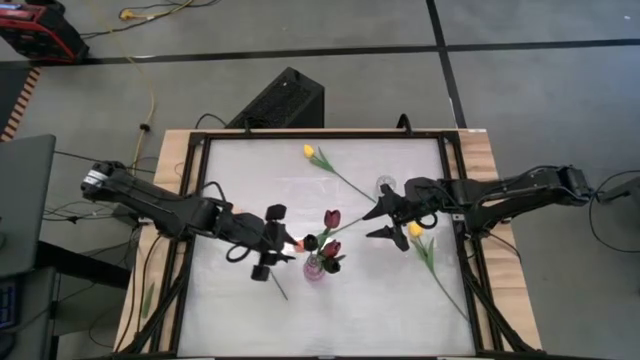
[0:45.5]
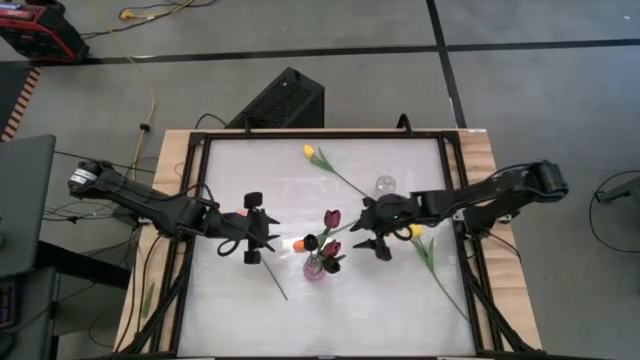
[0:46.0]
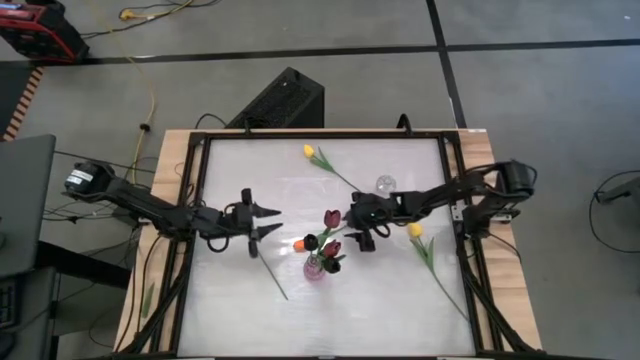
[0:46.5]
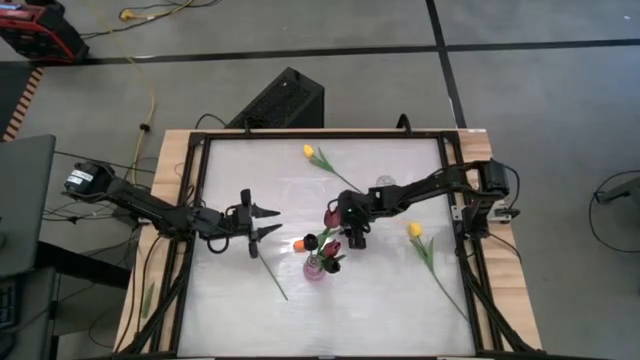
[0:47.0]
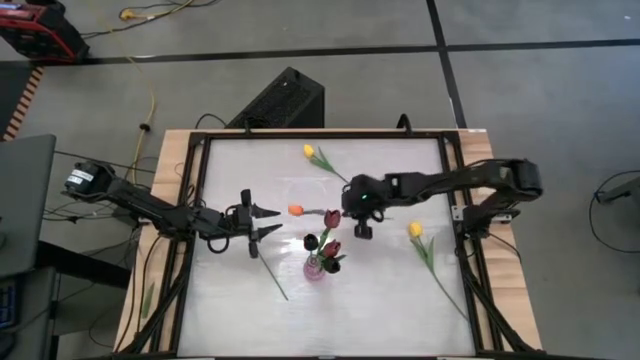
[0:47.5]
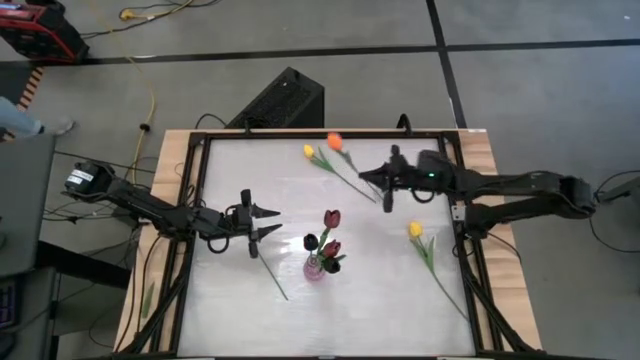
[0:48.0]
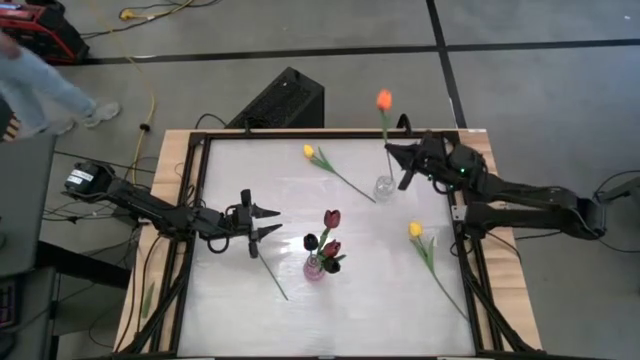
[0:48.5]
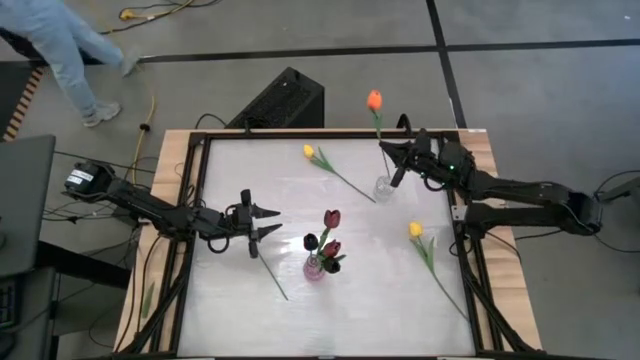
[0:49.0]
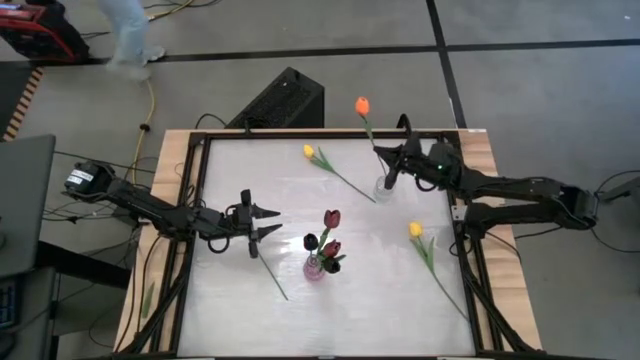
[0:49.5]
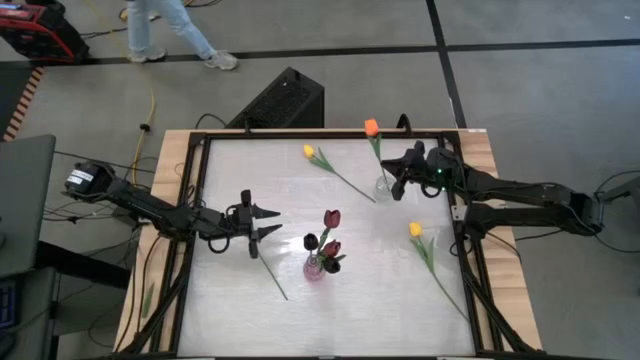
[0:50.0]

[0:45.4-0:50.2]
Task: Sort flowers into vase by color
Put the right orange flower into the transparent vase

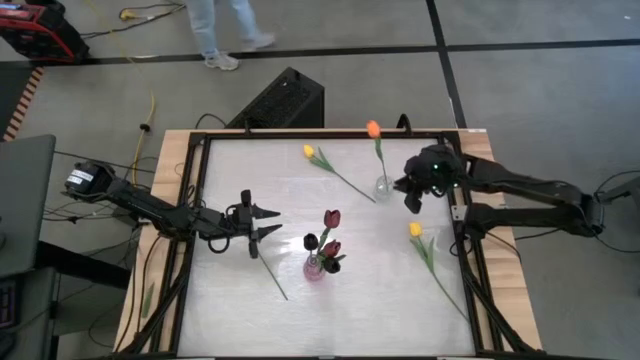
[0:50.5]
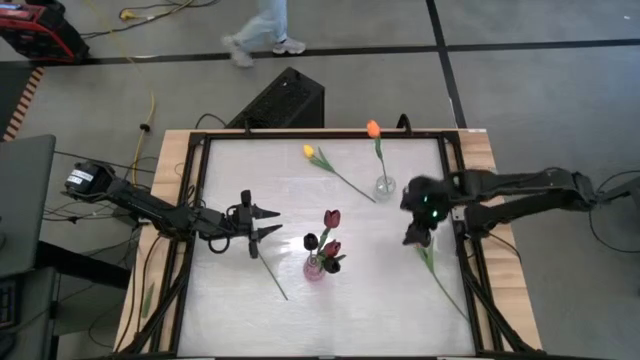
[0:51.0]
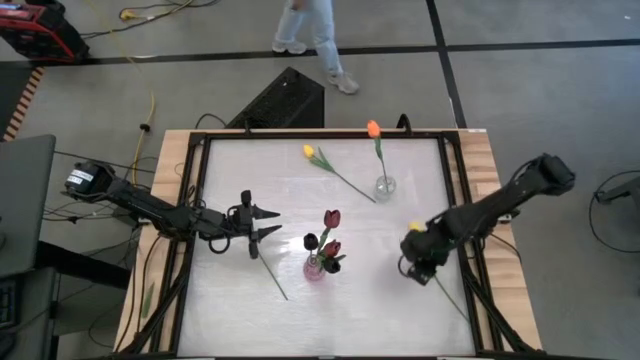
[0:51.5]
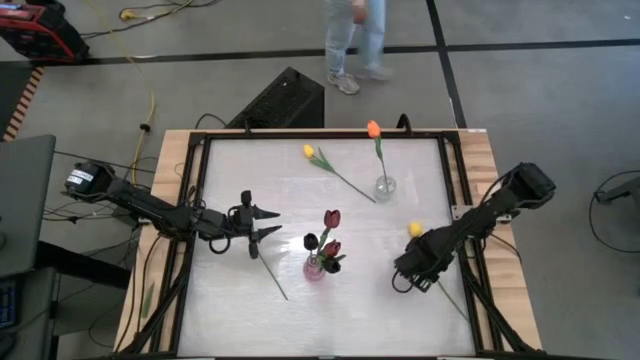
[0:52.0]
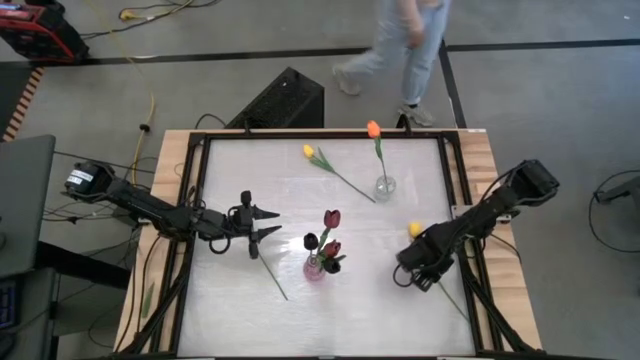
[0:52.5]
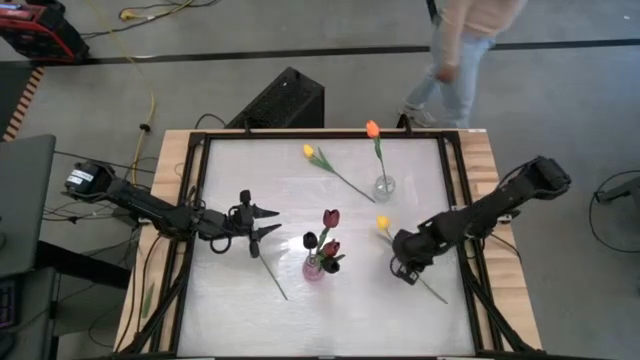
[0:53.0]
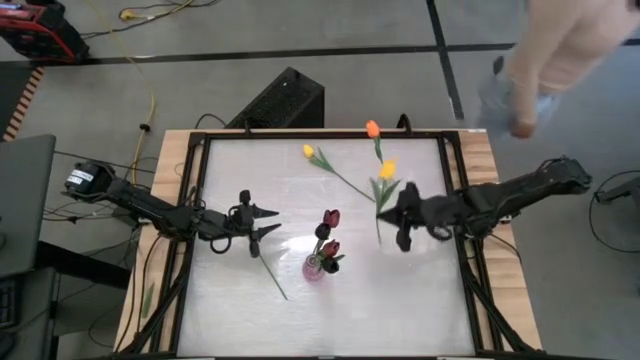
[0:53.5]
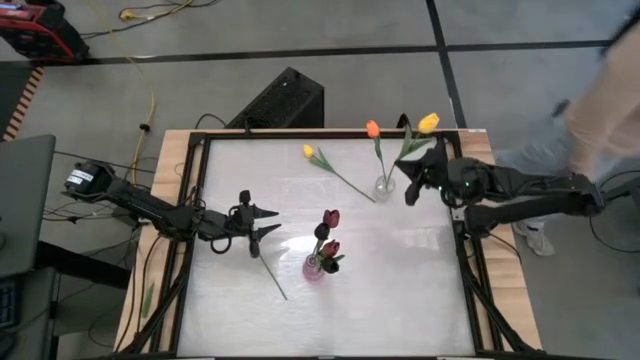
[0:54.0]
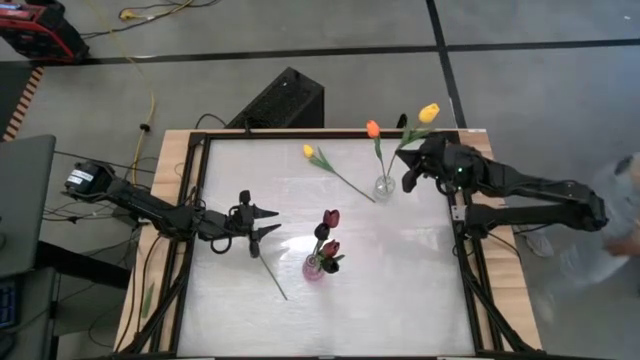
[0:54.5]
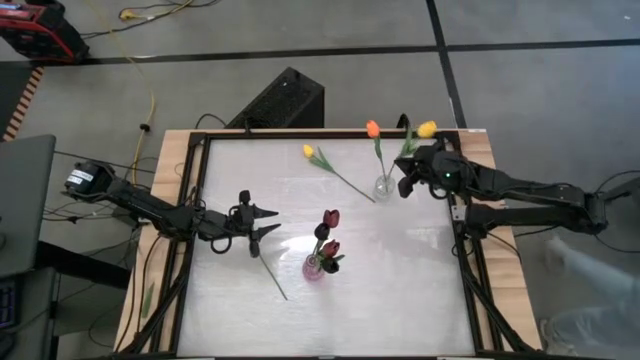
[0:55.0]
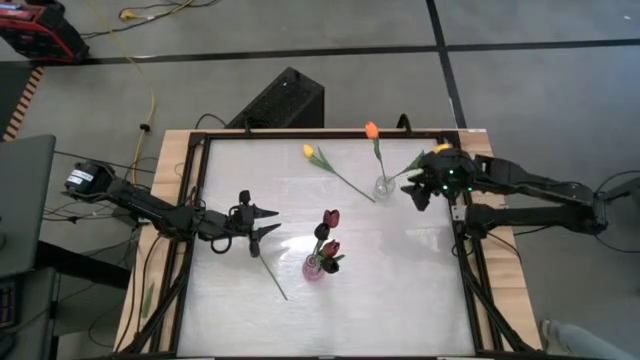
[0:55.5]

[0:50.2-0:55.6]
Put the bottom right yellow flower into the transparent vase

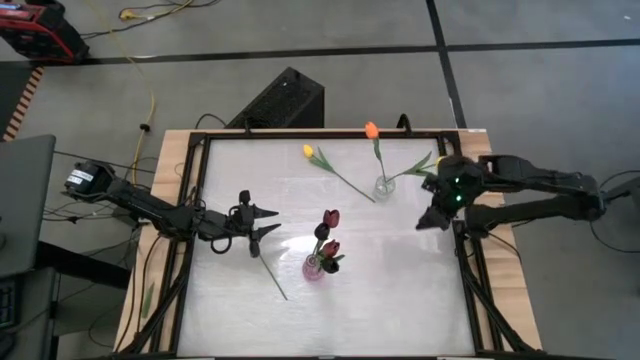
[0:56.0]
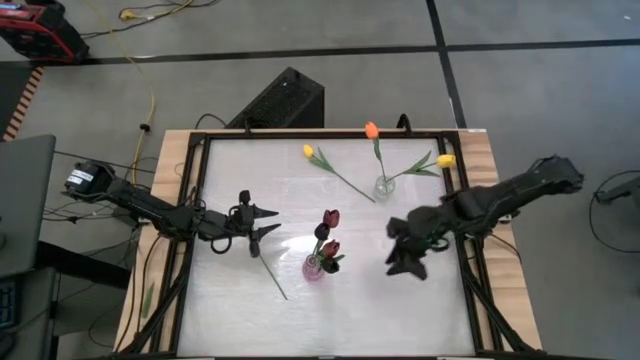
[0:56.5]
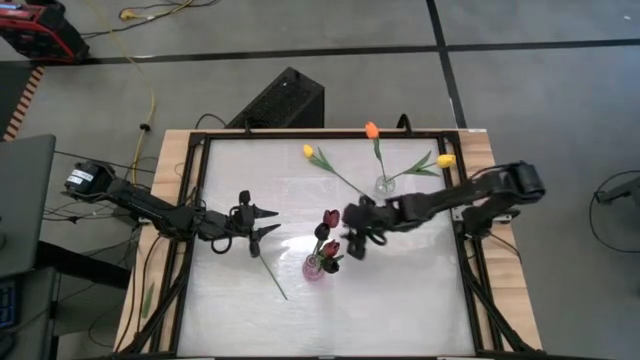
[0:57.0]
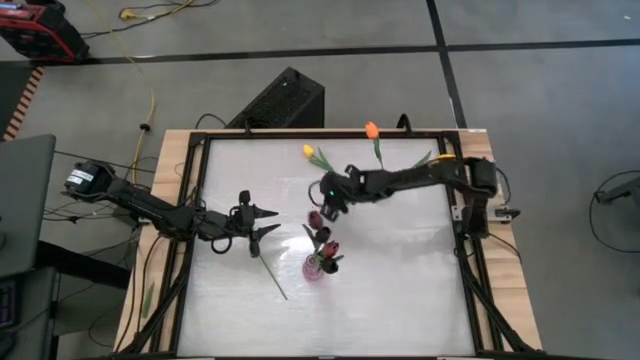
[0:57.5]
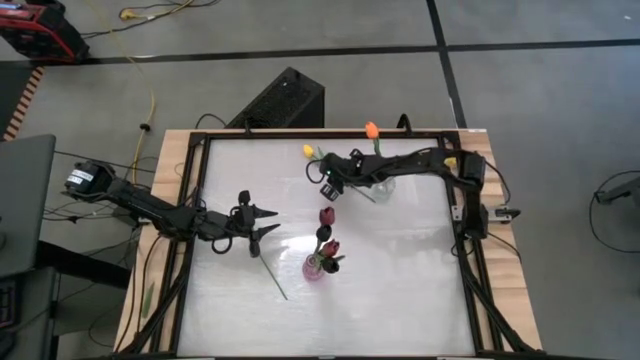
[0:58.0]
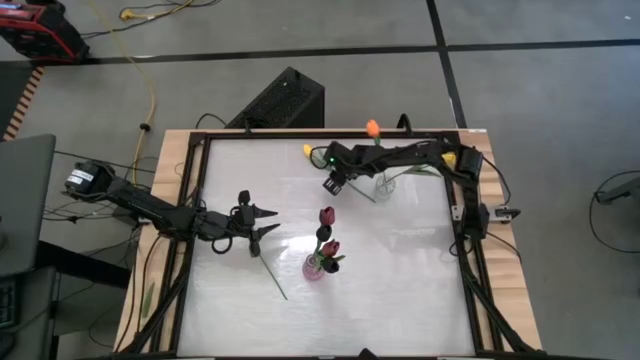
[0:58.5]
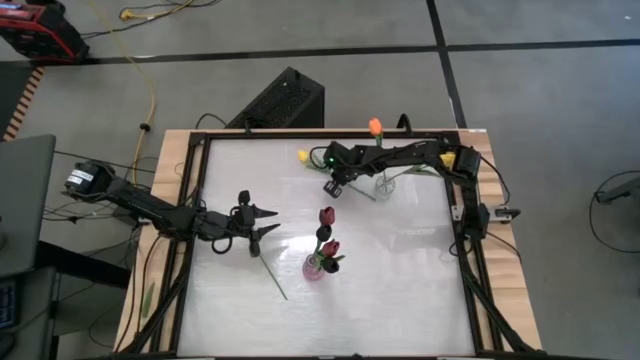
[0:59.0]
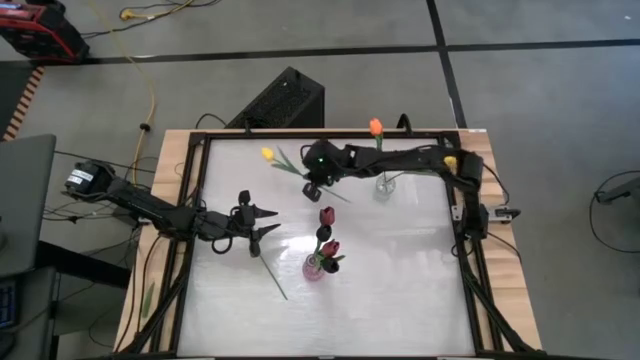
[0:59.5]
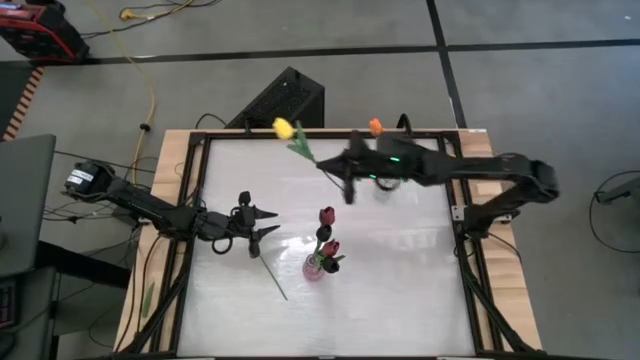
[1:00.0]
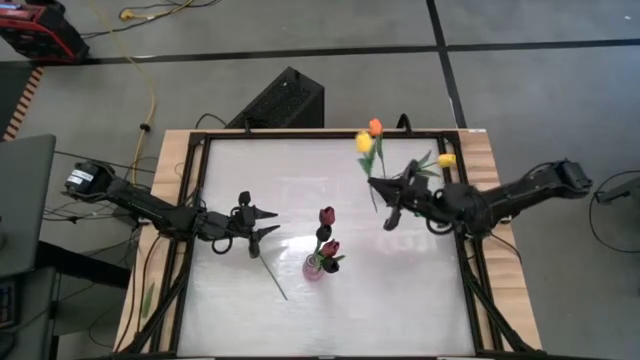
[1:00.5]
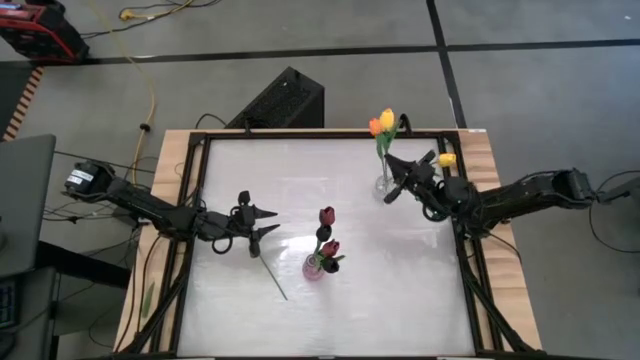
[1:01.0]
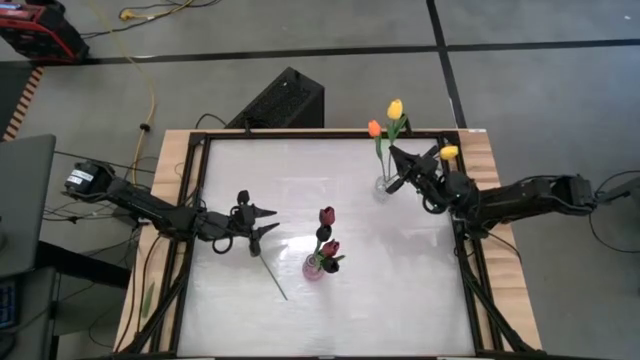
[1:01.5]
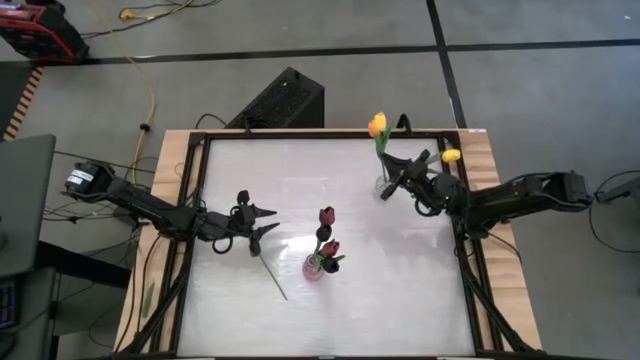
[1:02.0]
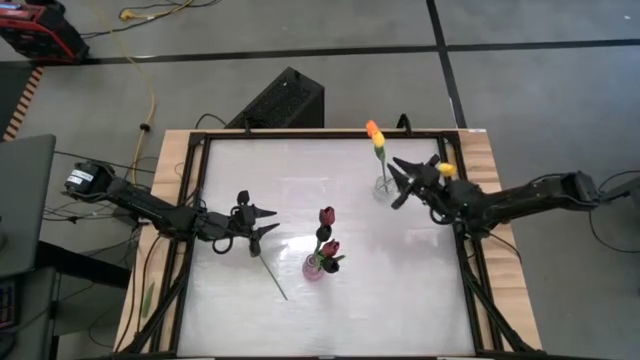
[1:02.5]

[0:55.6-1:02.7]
Put the yellow flower into the transparent vase

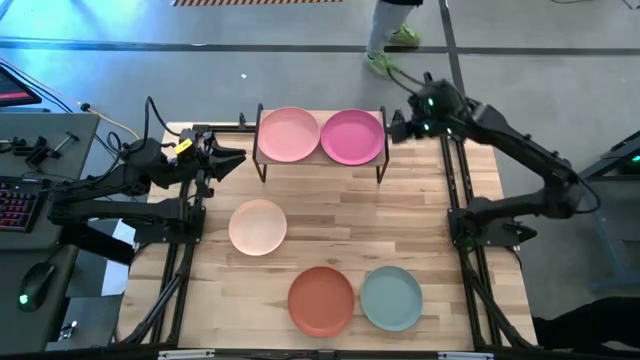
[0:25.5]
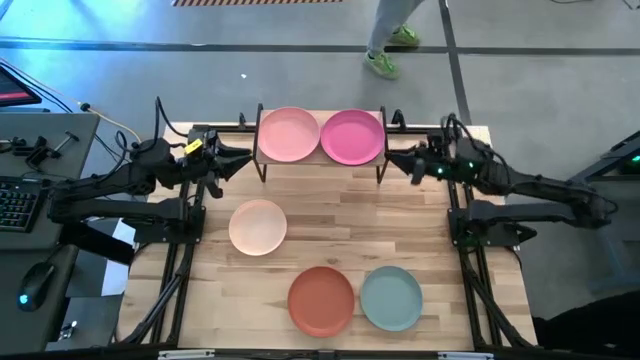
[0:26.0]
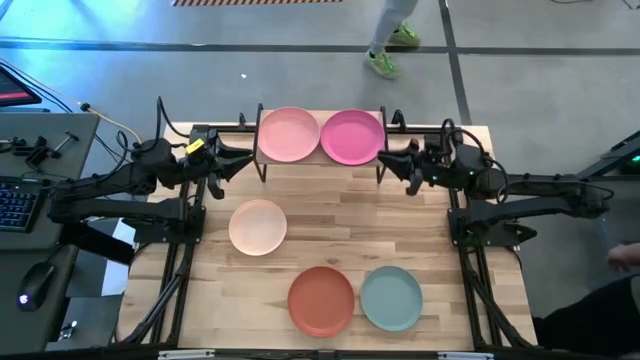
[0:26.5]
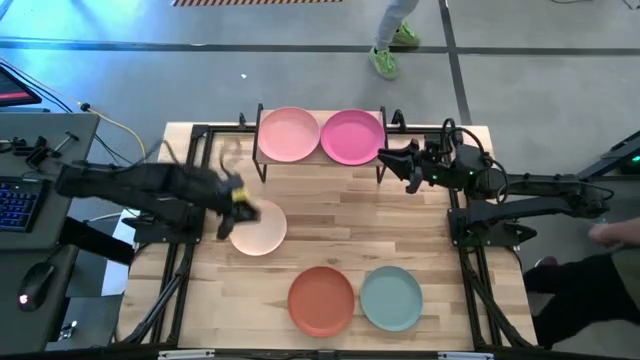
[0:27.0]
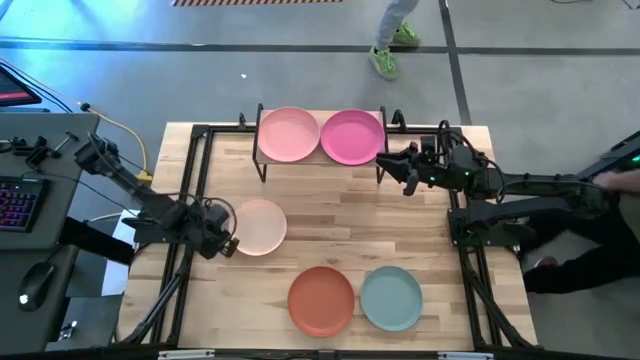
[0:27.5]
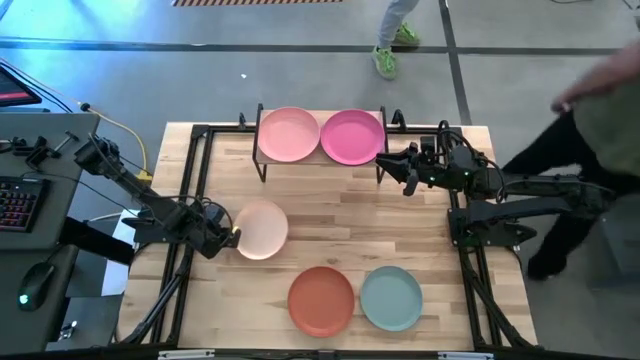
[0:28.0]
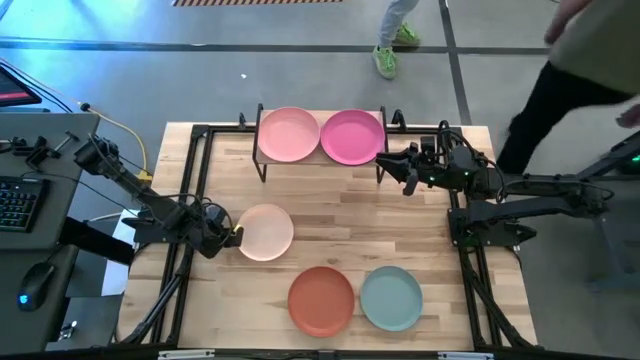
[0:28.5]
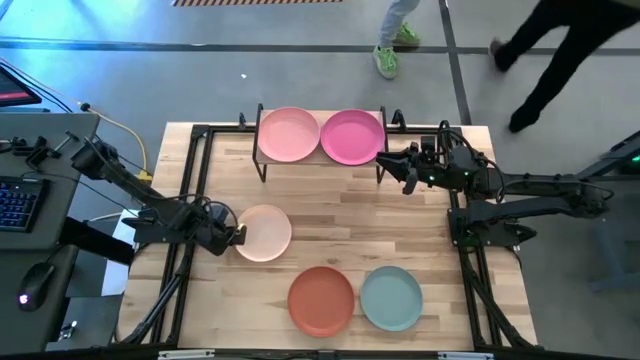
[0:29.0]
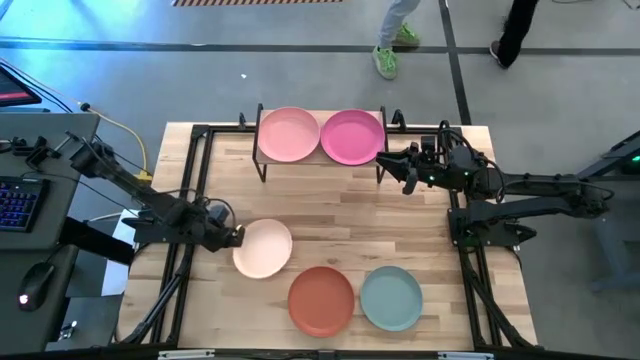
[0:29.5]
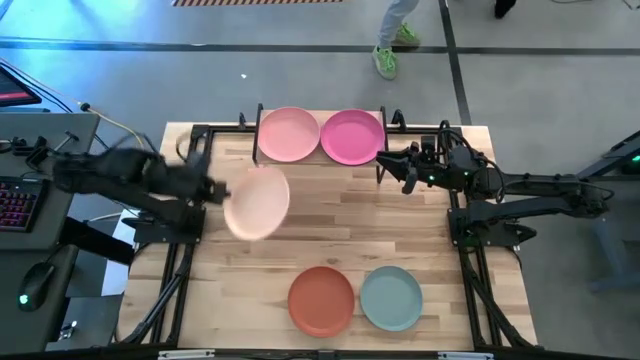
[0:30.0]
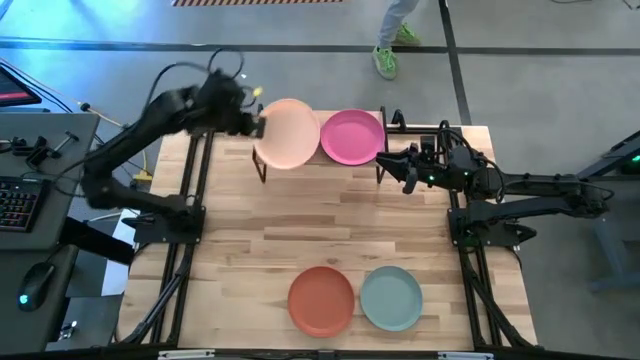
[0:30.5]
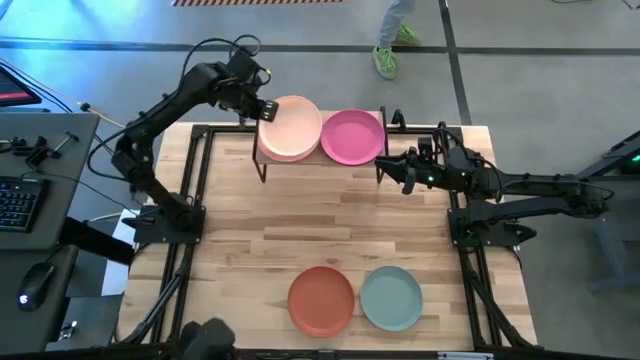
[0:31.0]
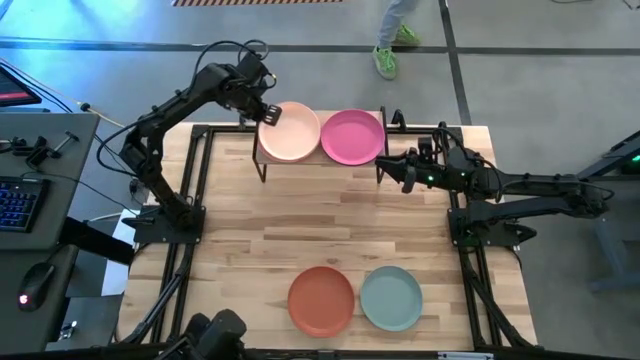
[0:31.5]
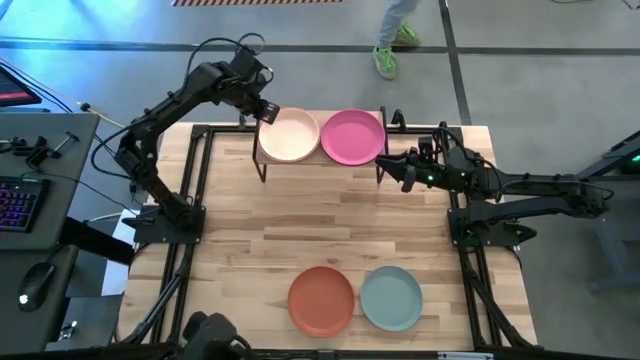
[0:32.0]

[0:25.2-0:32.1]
Task: Place and stack plates onto a shelf
Stack the white plate on top of the light pink plate on the shelf
